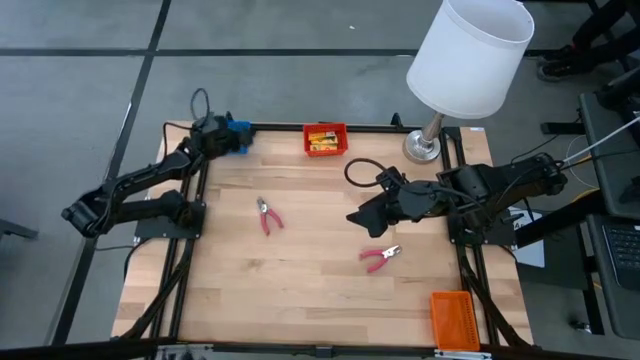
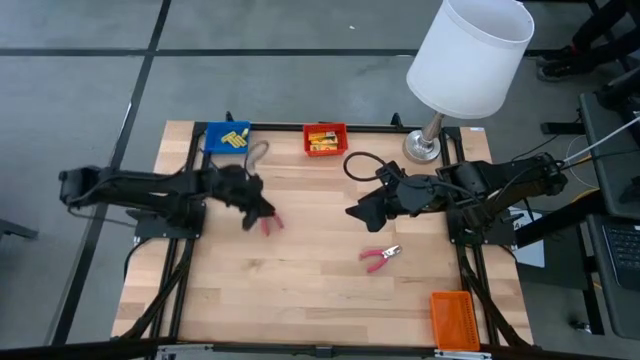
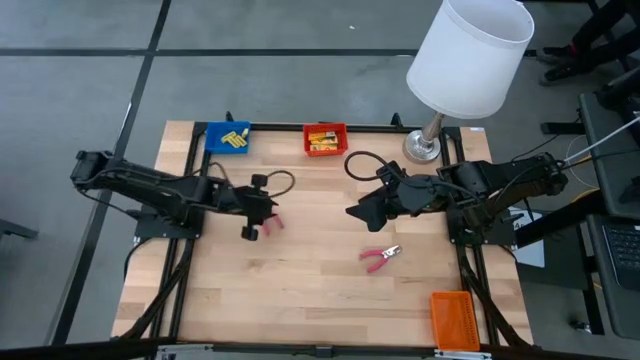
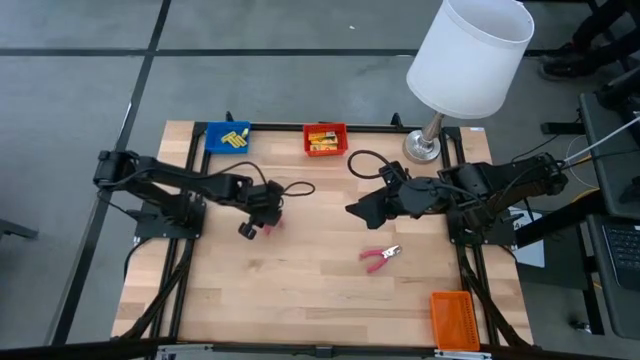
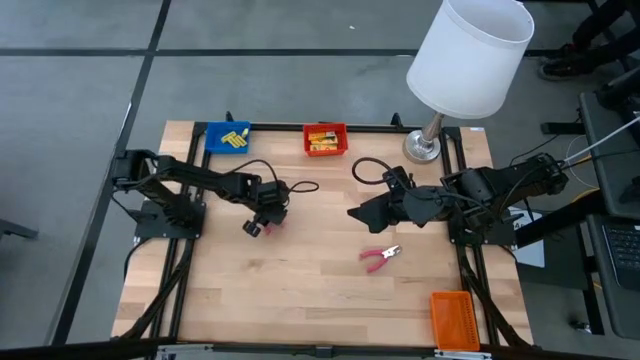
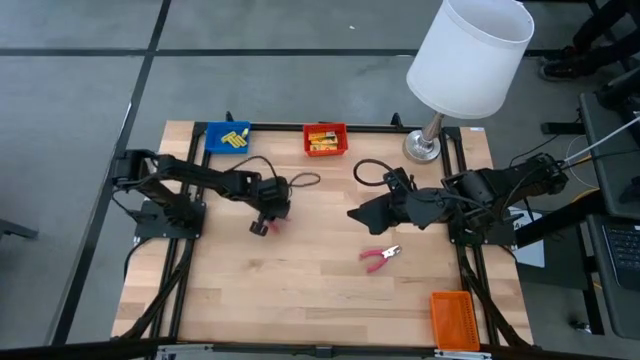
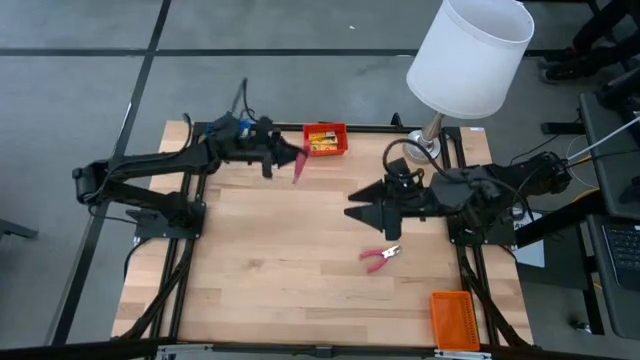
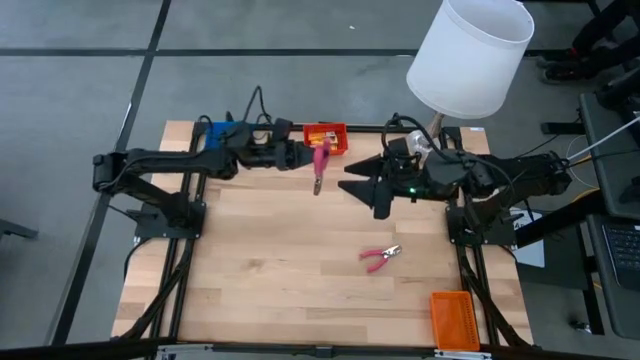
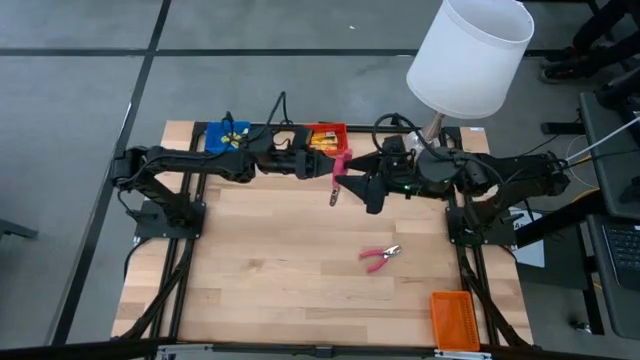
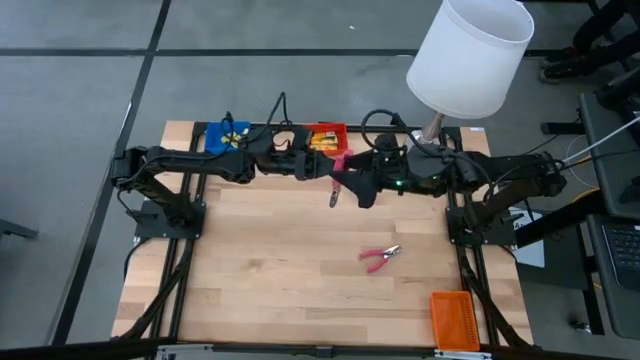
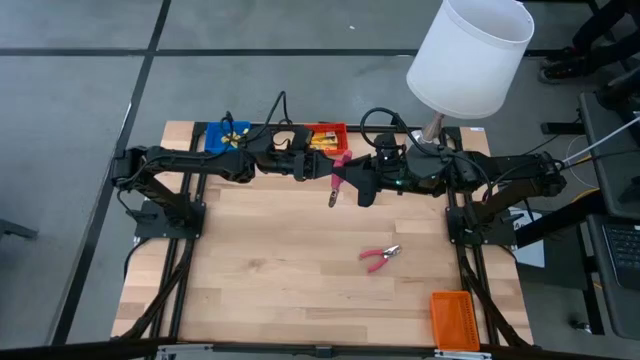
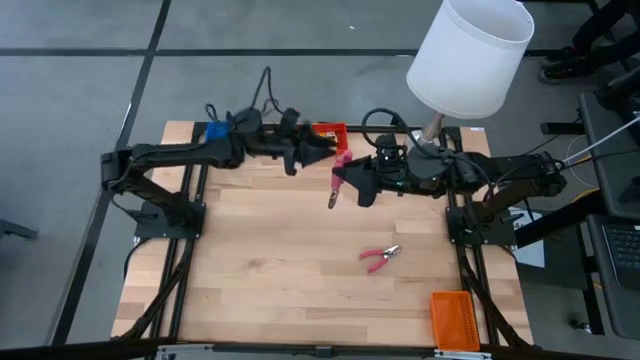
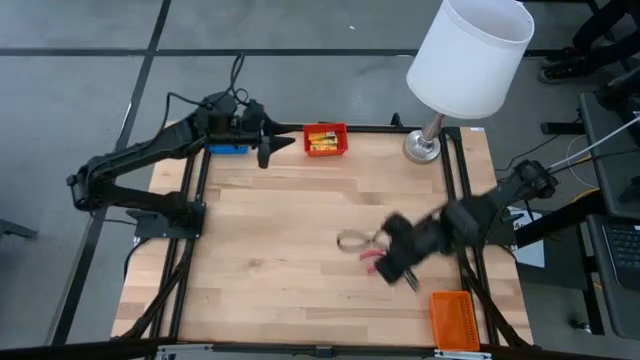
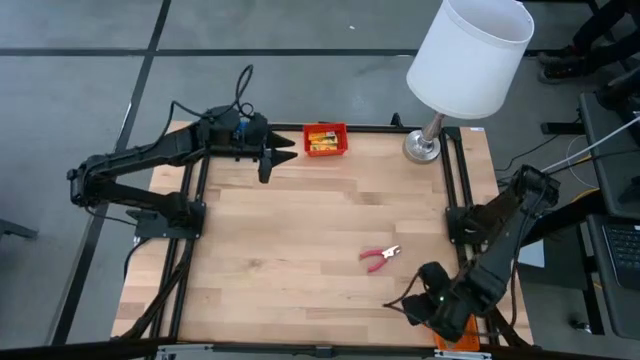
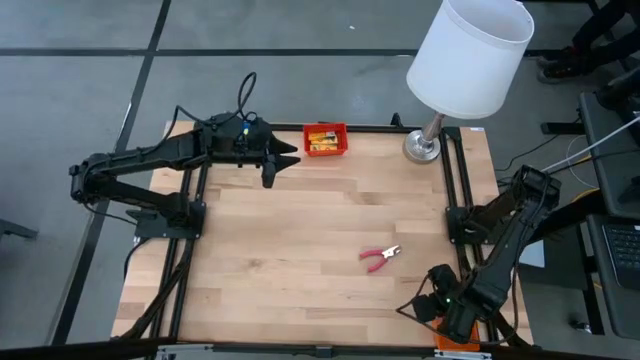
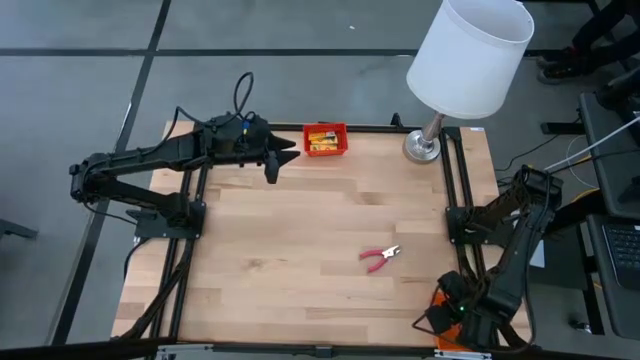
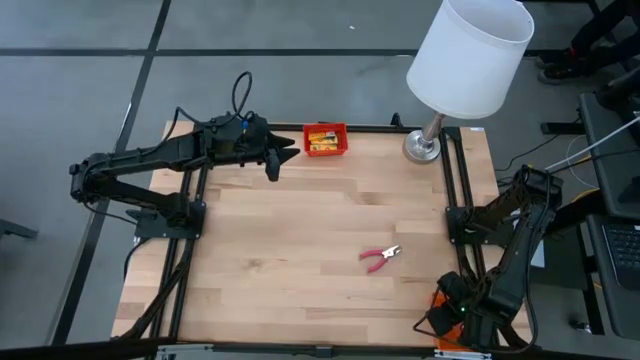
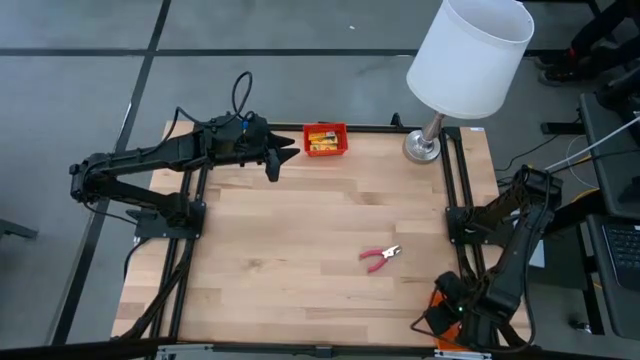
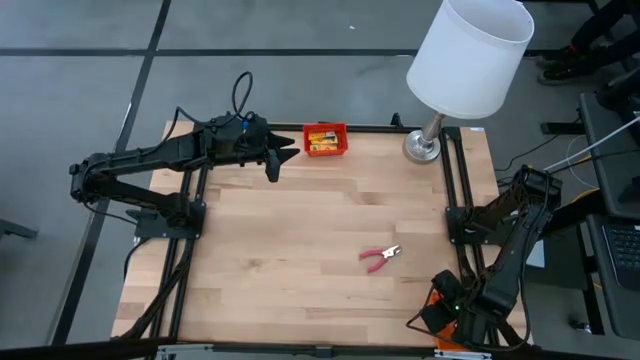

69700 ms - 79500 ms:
Task: Pick & Place School Supplies
Put the pink hole puncher into the orange bin

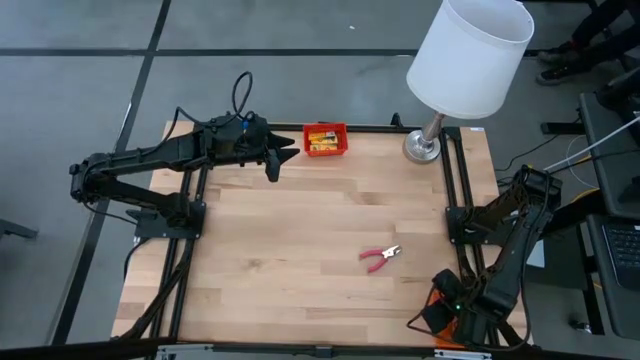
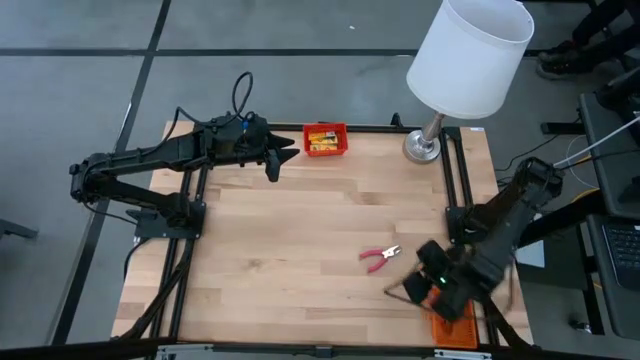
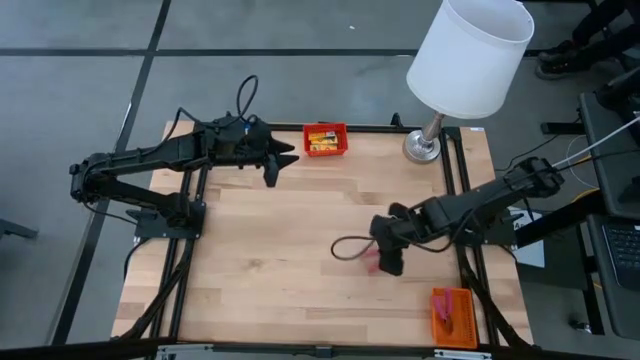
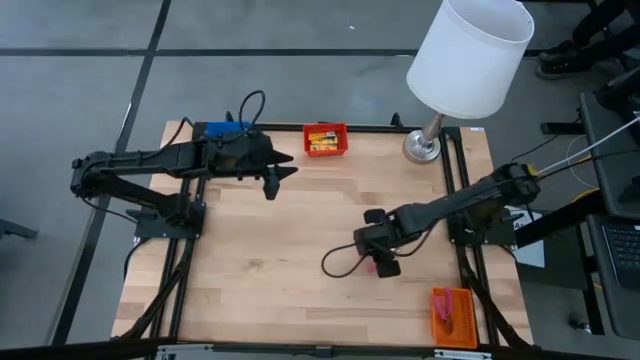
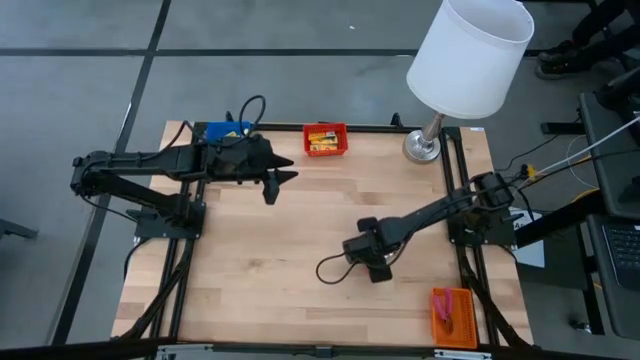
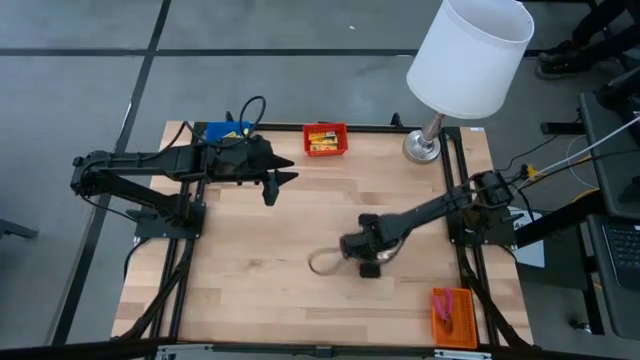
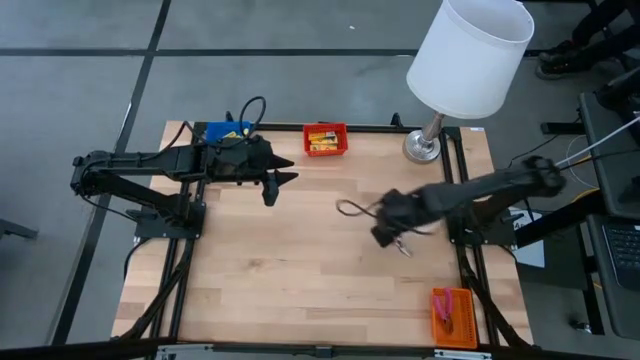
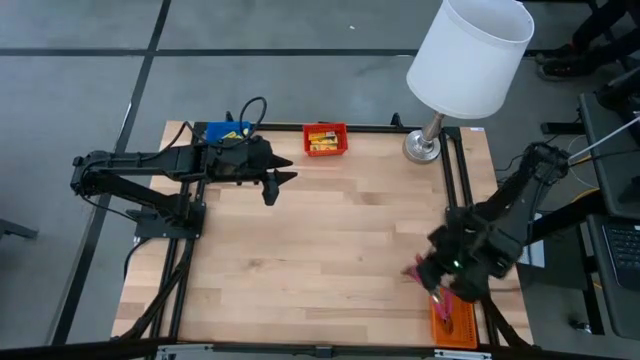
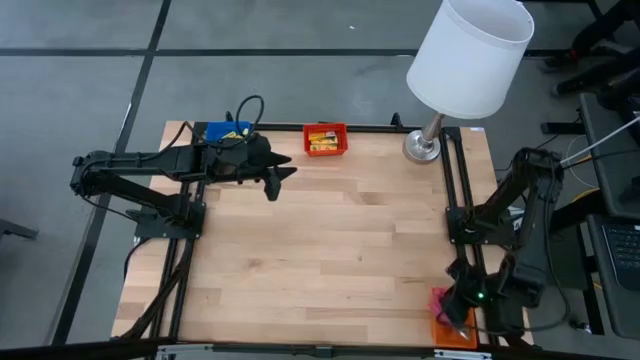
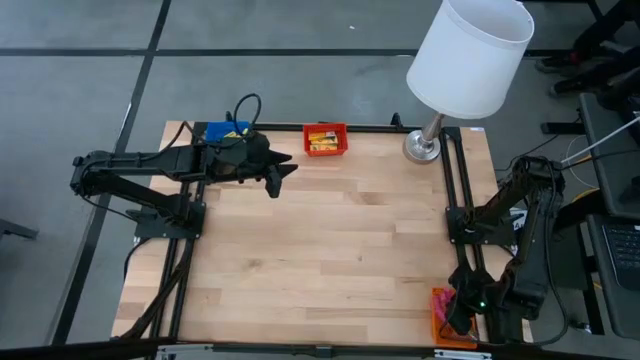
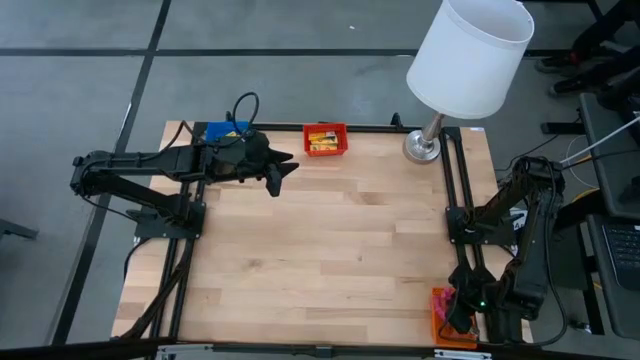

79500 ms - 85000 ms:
Put the pink hole puncher into the orange bin

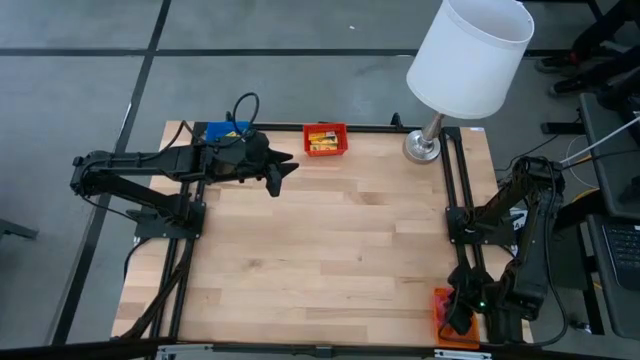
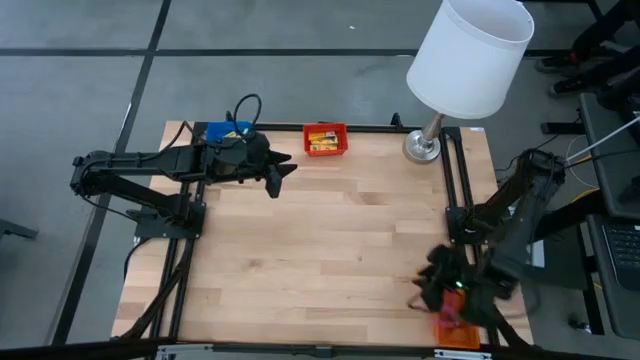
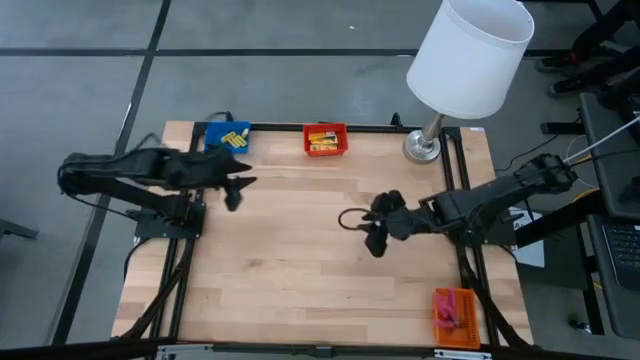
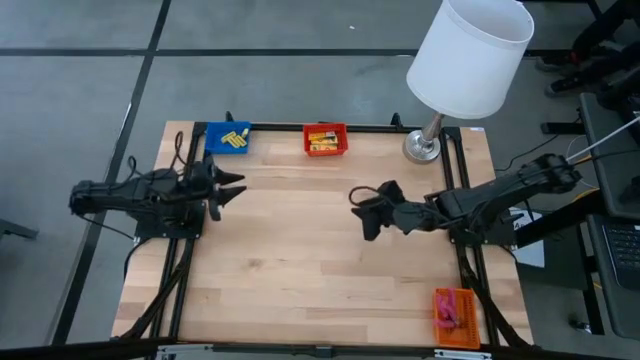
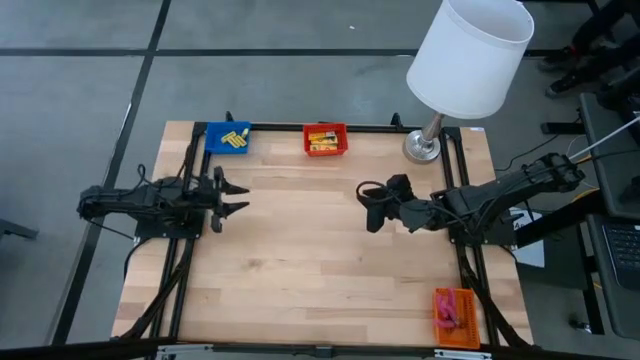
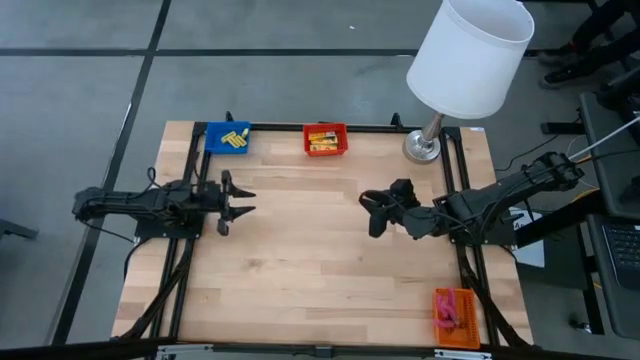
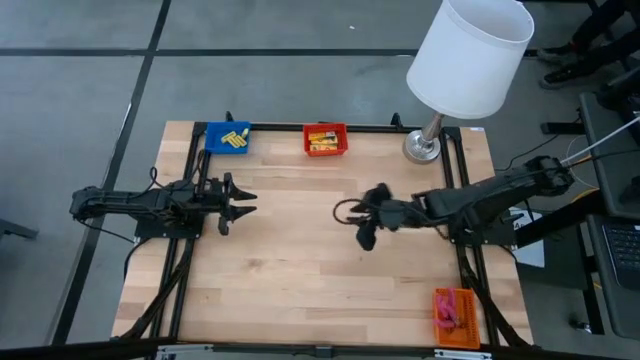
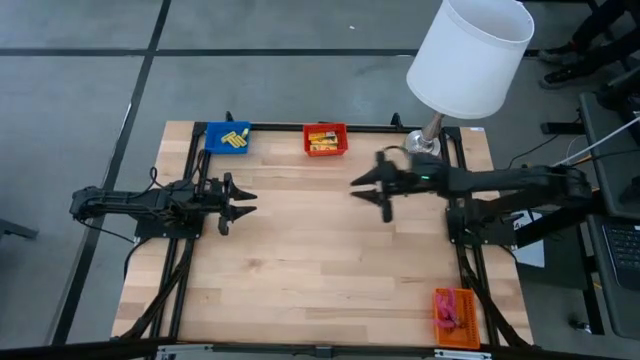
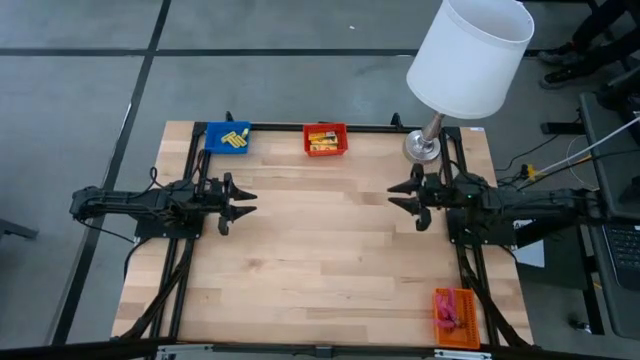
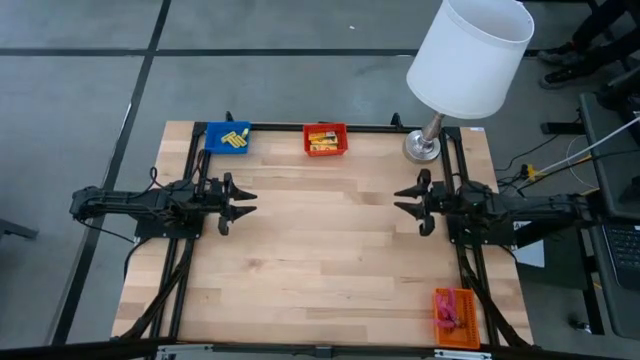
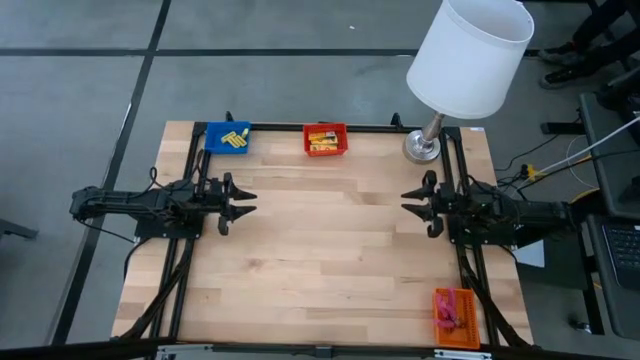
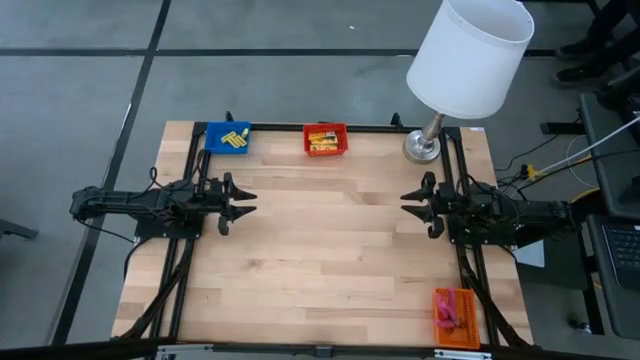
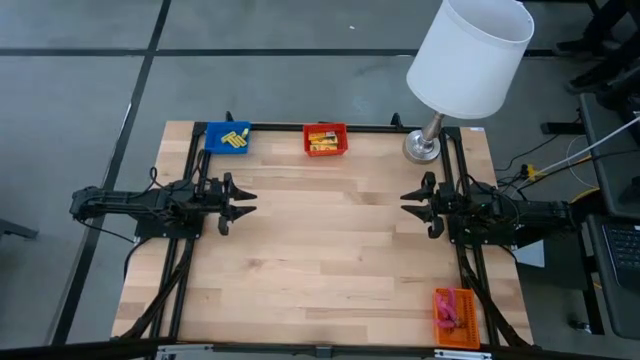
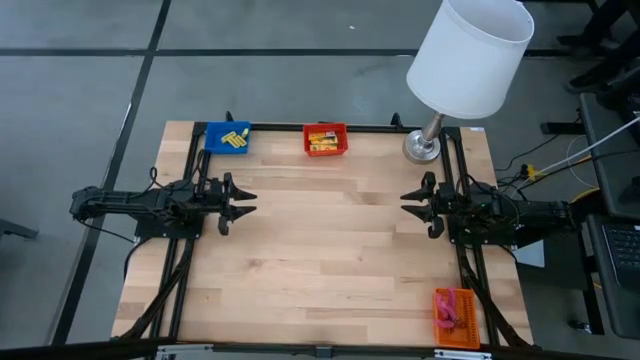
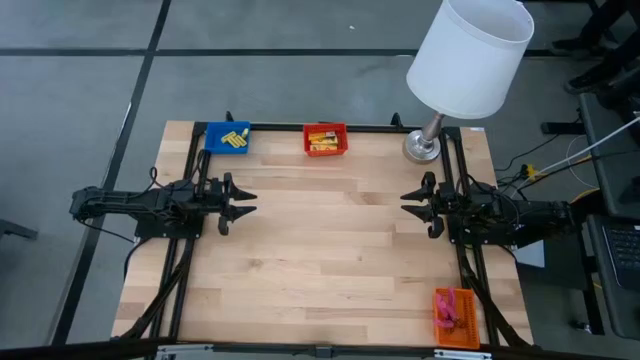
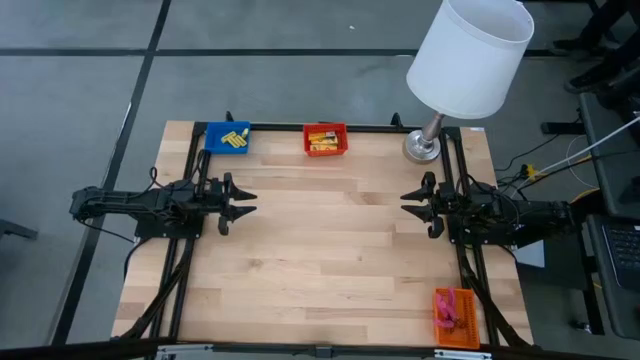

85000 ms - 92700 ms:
Return to Home Position
